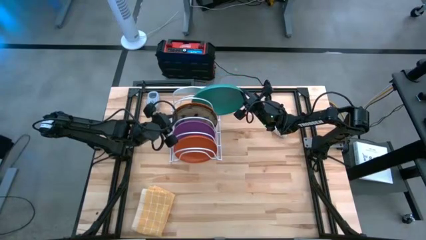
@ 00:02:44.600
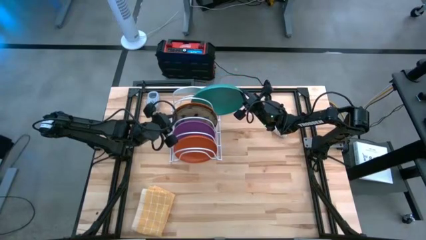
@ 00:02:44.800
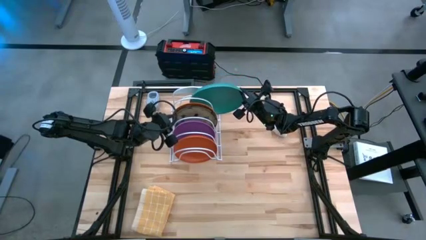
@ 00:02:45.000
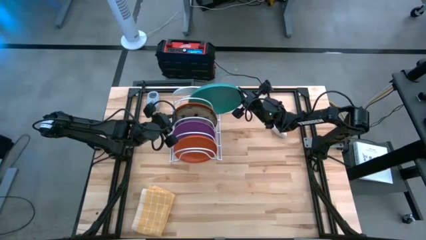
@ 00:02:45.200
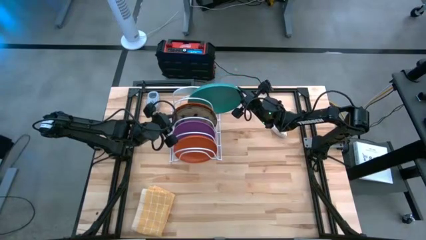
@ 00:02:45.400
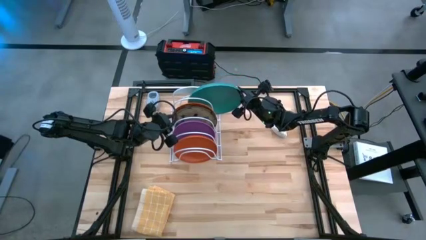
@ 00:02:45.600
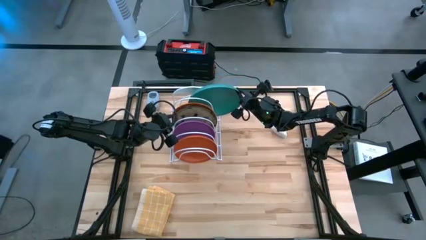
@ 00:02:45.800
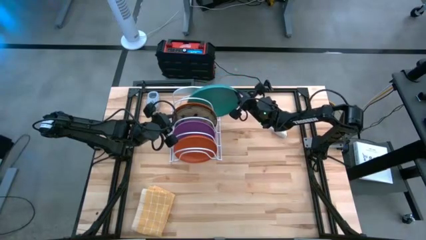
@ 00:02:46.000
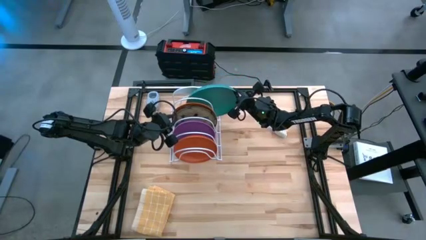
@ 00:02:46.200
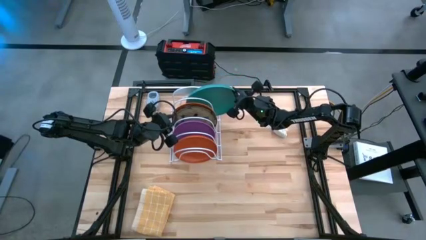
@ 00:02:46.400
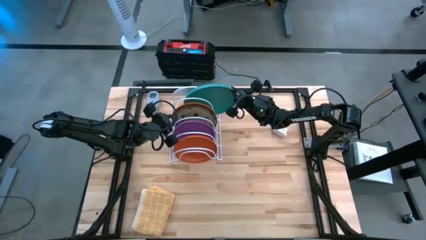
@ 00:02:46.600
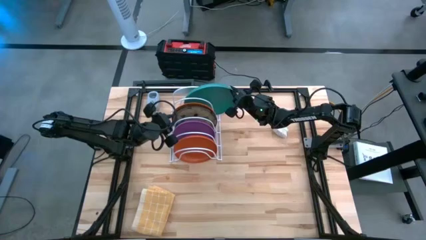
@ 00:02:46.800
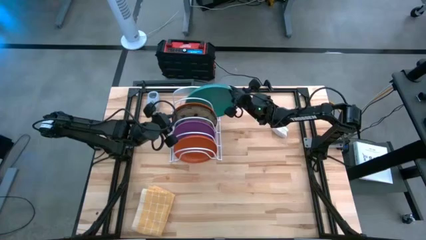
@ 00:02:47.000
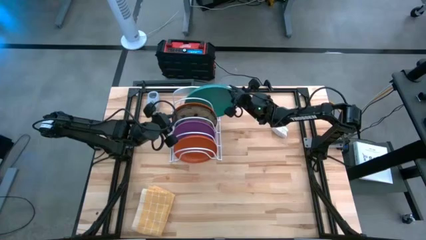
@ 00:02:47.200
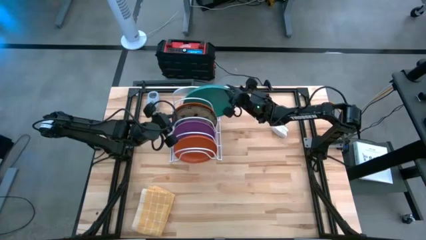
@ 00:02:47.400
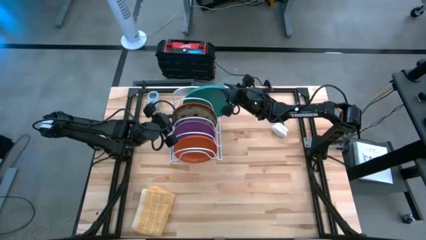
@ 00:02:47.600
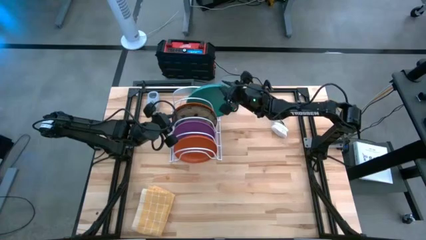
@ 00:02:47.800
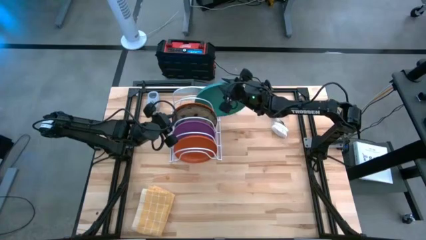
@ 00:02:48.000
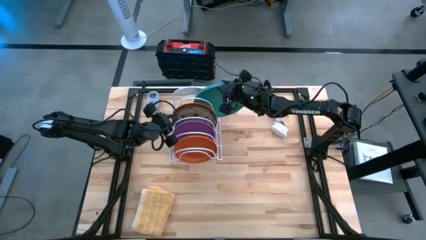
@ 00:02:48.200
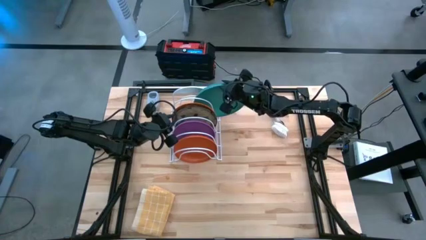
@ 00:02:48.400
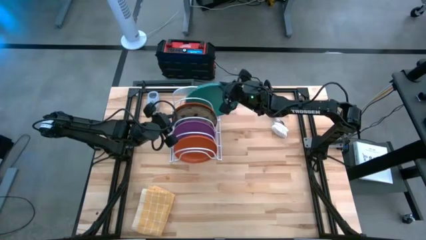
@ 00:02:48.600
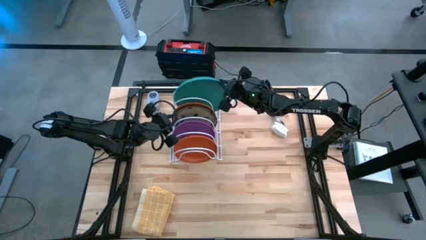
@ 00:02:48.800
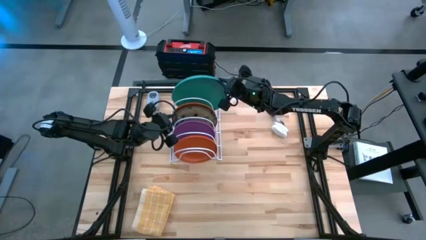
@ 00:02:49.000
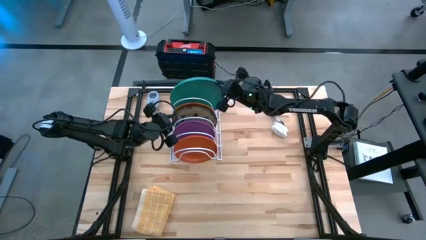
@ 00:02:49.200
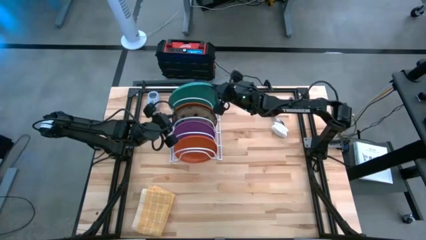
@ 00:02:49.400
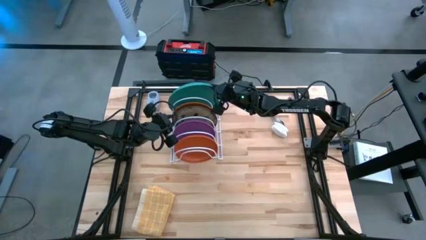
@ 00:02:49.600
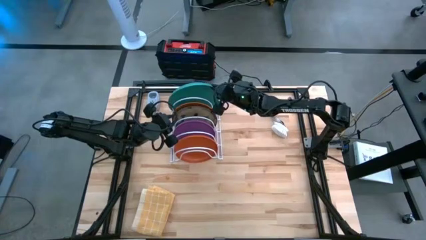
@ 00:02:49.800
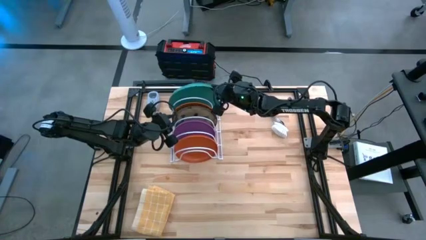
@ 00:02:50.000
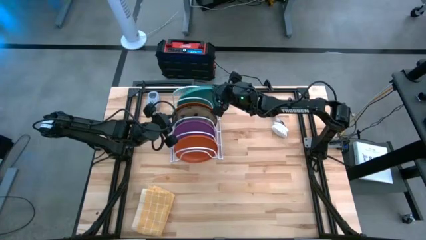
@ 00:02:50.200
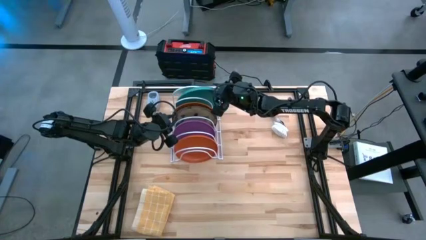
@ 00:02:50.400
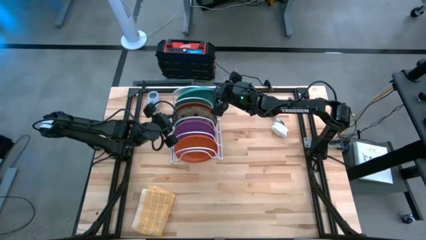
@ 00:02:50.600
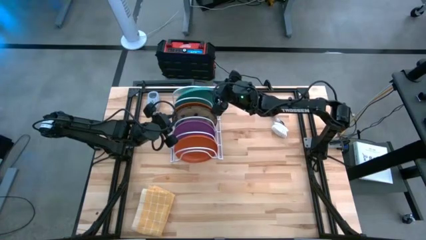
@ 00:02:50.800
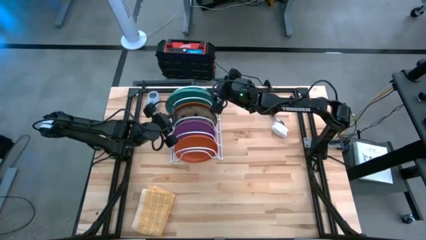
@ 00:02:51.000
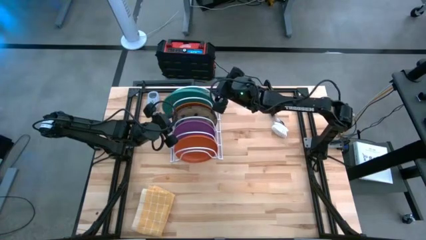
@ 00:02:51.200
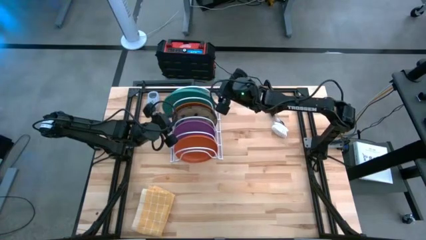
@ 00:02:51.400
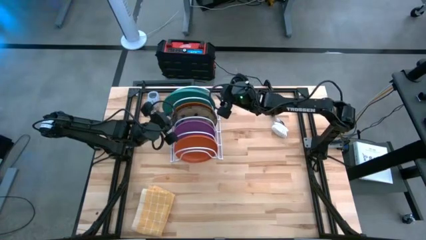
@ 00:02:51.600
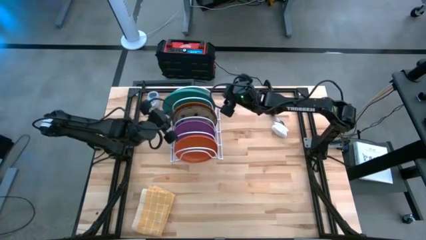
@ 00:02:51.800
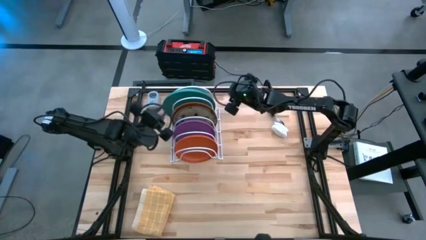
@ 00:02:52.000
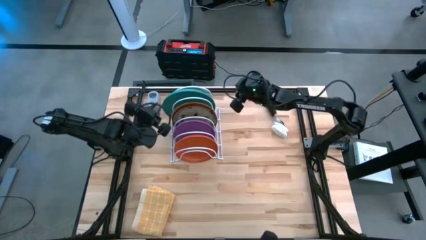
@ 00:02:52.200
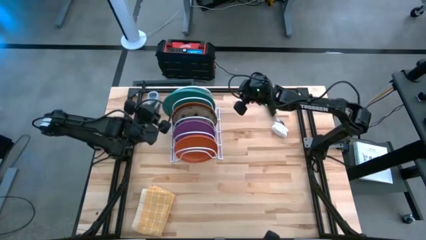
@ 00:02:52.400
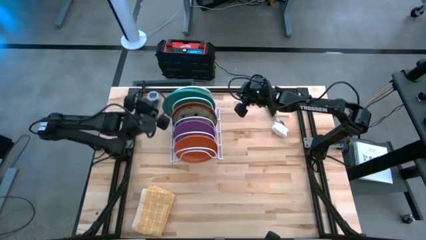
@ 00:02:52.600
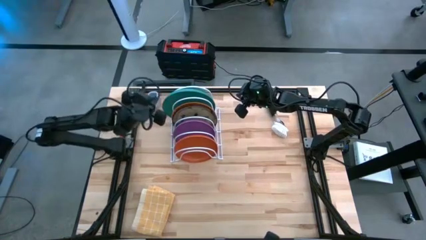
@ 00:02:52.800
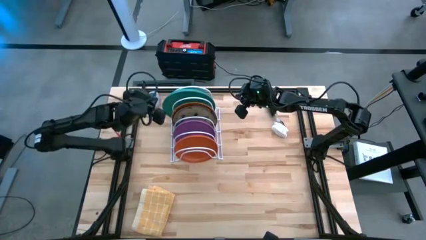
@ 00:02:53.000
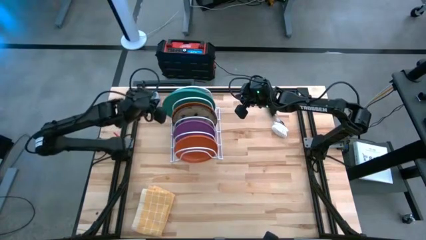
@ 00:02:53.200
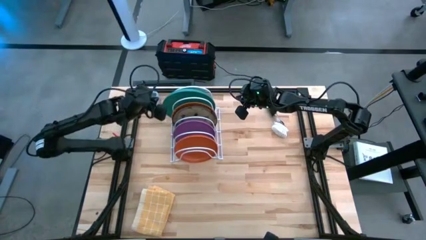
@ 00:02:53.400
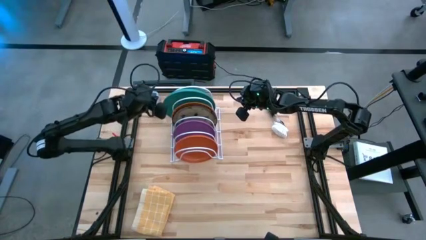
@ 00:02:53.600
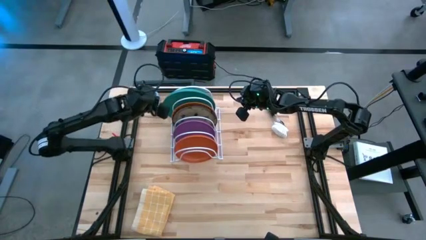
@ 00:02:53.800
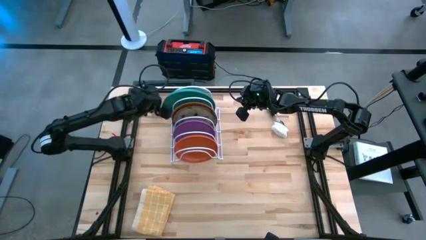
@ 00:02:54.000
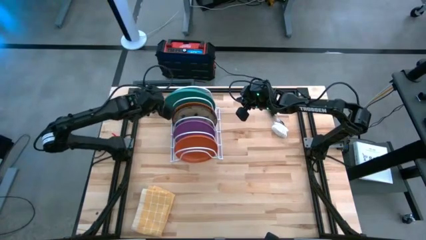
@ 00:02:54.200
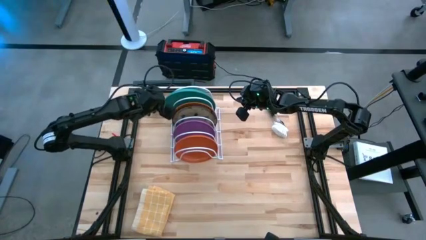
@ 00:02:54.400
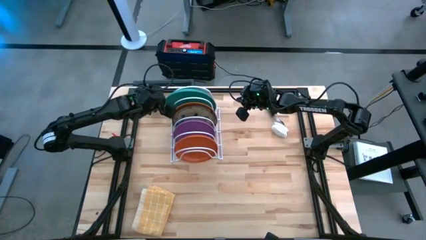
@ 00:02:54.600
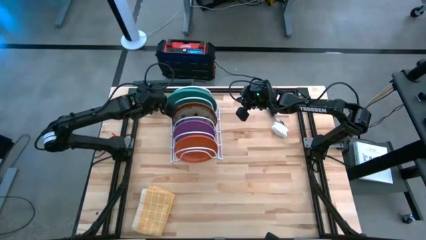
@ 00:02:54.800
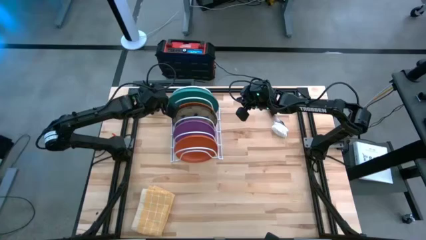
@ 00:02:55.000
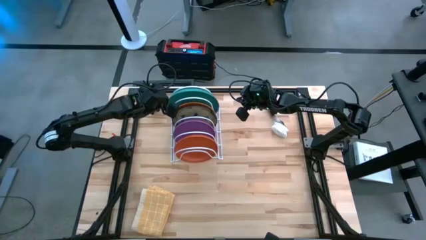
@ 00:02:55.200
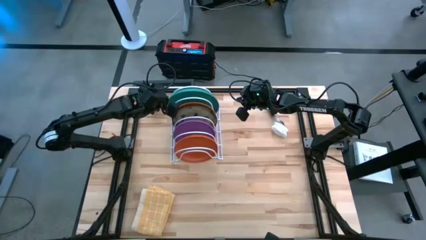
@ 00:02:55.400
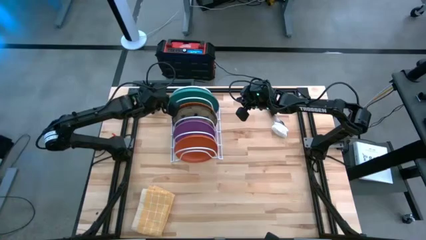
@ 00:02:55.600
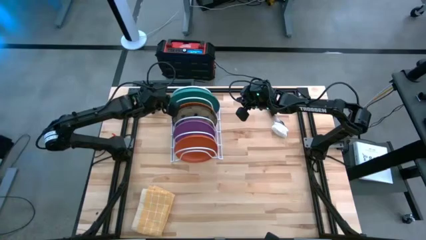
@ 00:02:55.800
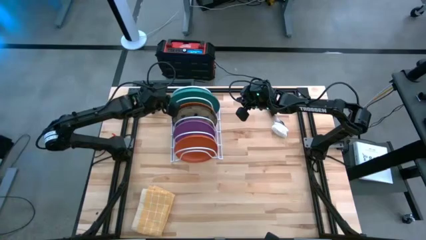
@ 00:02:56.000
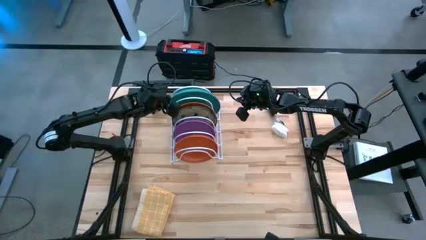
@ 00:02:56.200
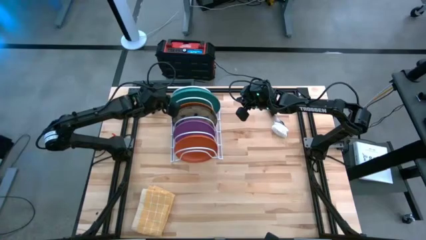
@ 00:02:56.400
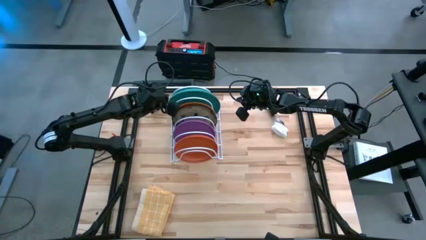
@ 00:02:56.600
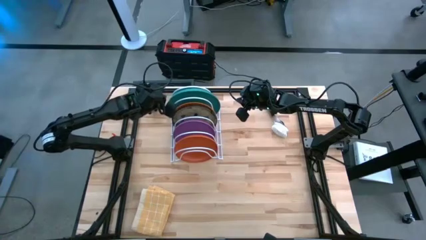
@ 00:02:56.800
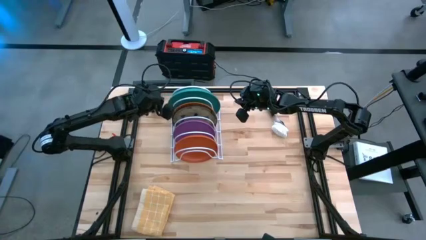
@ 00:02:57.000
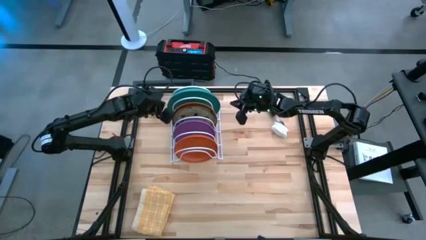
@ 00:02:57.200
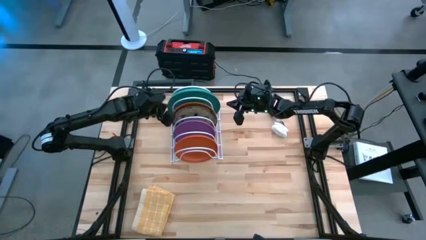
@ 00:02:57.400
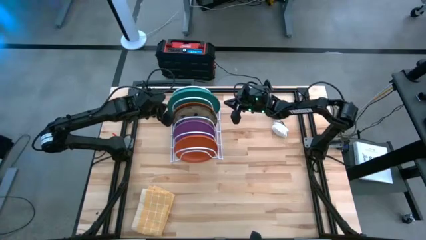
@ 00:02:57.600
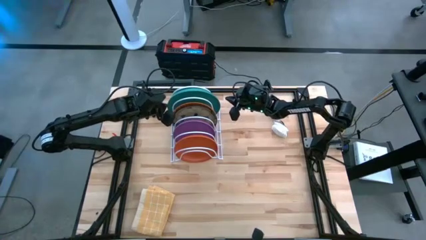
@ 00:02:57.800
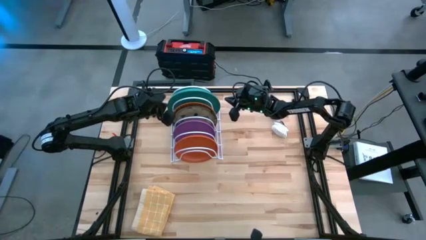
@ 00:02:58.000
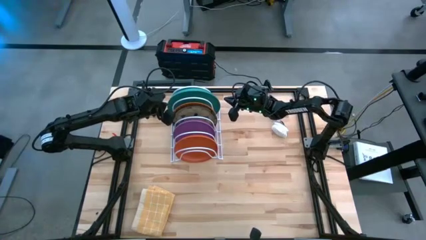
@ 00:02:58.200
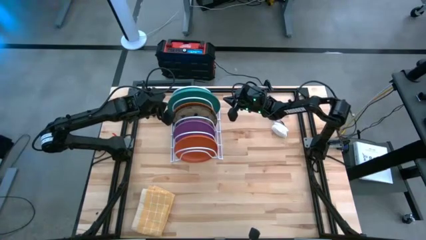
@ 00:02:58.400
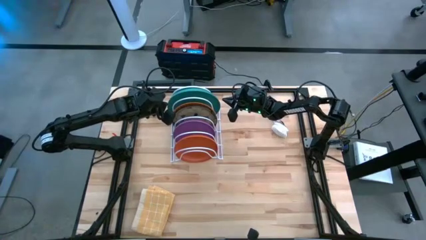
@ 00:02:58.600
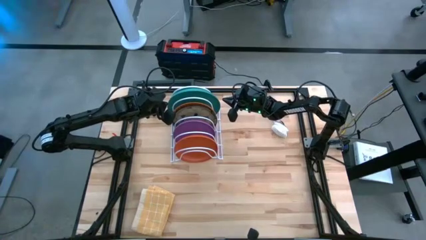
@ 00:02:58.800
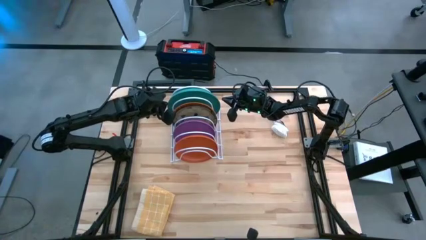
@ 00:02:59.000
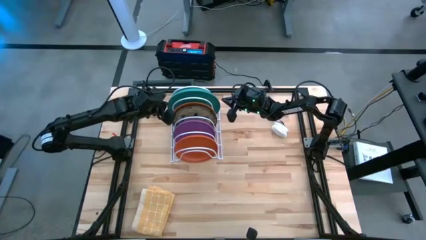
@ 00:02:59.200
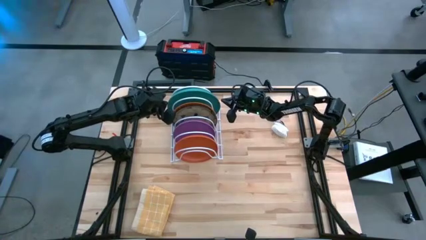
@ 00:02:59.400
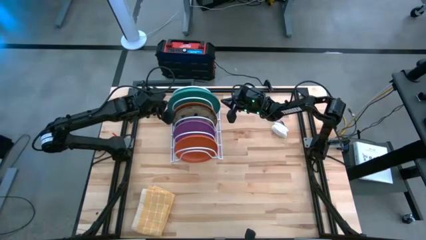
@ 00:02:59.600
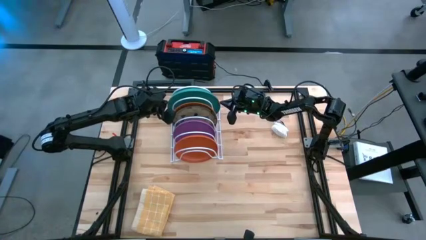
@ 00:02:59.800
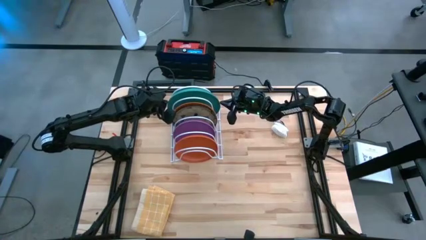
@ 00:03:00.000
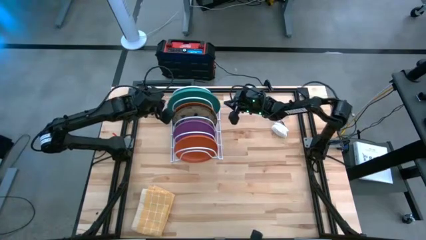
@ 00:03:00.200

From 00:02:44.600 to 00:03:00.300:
Task: Sort dishes
Put the green plate into the dish rack
